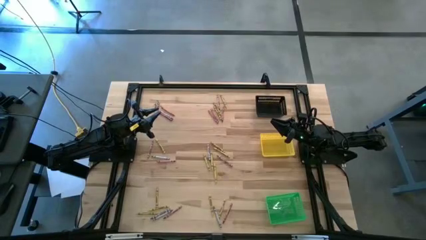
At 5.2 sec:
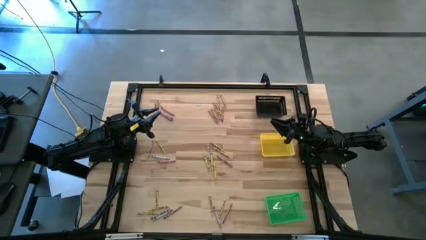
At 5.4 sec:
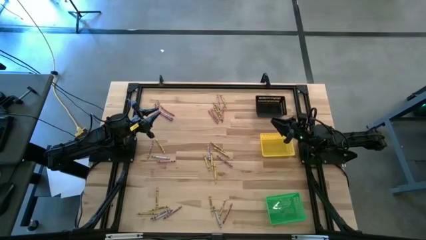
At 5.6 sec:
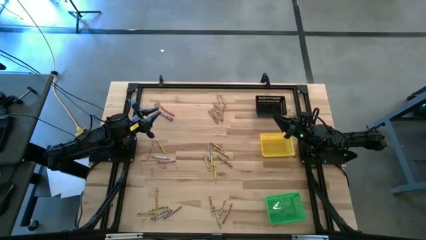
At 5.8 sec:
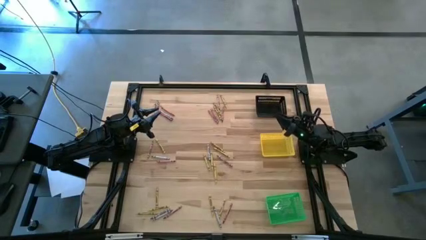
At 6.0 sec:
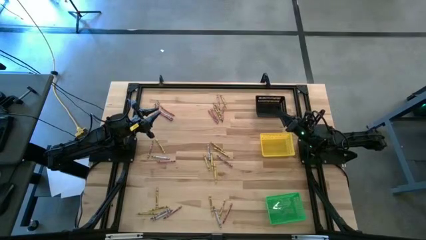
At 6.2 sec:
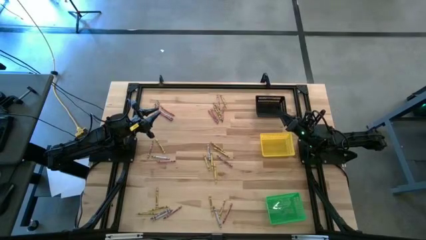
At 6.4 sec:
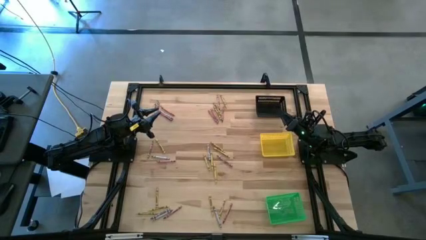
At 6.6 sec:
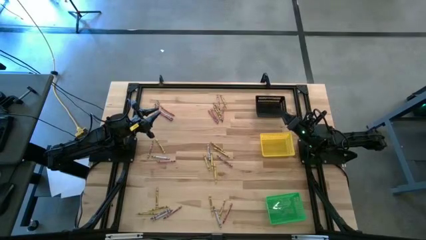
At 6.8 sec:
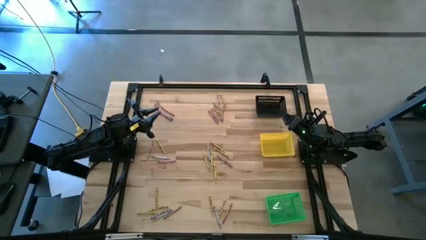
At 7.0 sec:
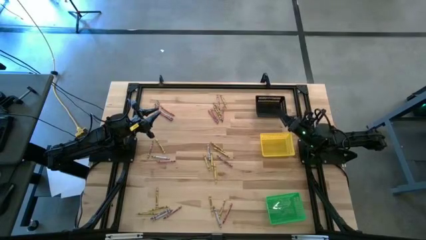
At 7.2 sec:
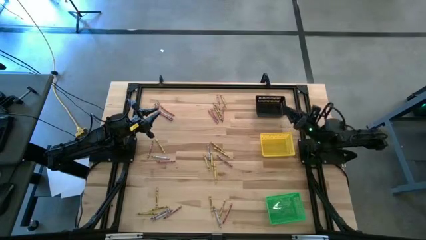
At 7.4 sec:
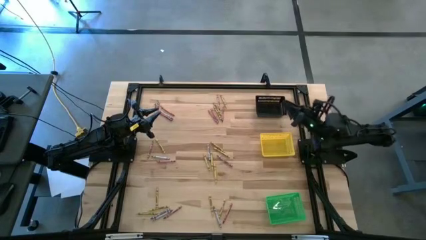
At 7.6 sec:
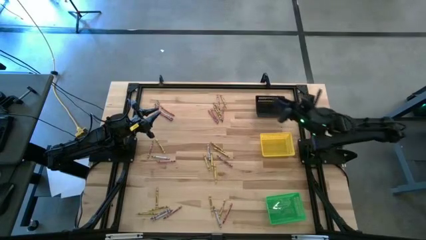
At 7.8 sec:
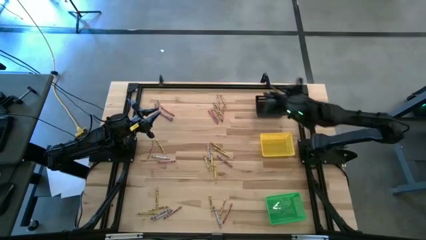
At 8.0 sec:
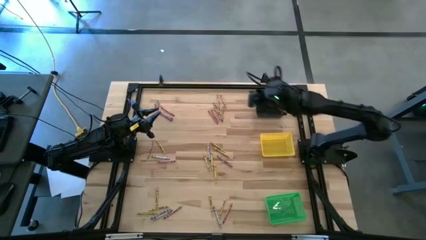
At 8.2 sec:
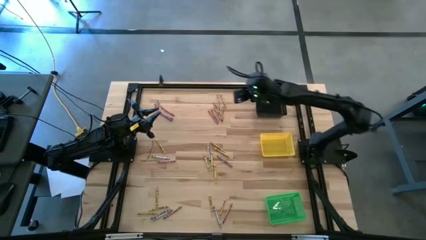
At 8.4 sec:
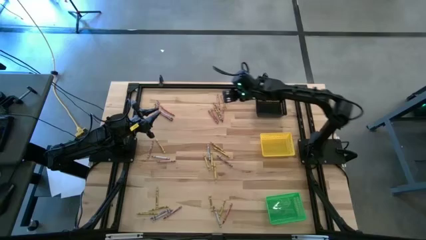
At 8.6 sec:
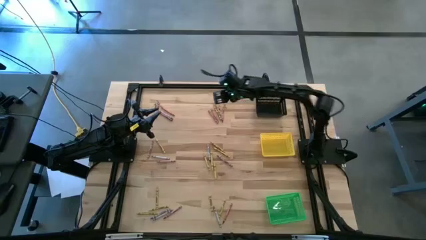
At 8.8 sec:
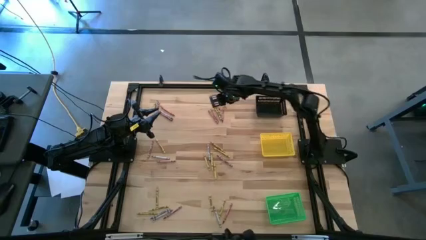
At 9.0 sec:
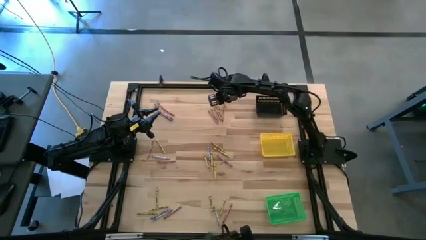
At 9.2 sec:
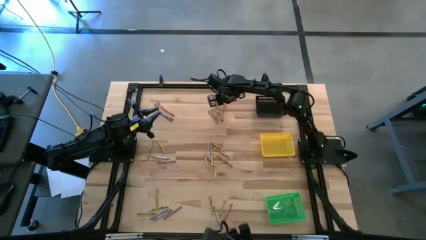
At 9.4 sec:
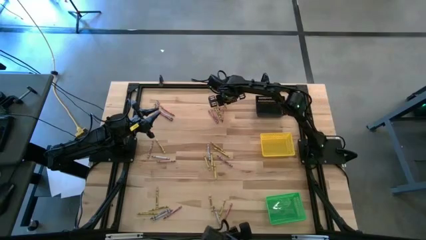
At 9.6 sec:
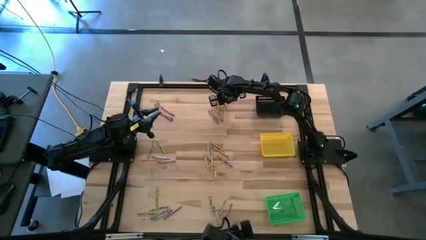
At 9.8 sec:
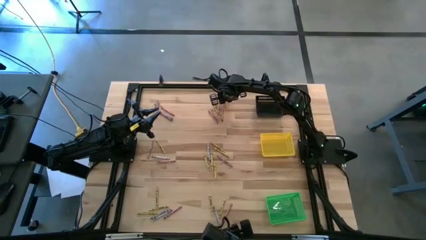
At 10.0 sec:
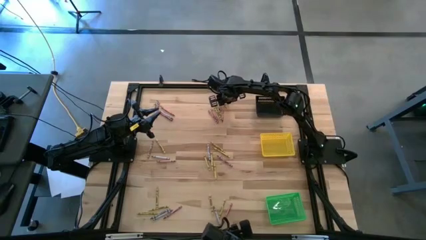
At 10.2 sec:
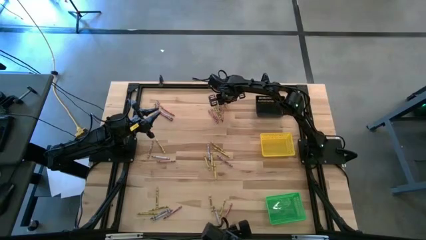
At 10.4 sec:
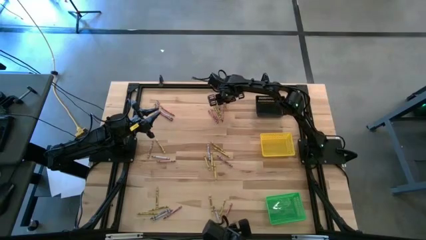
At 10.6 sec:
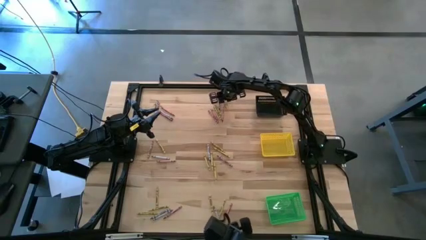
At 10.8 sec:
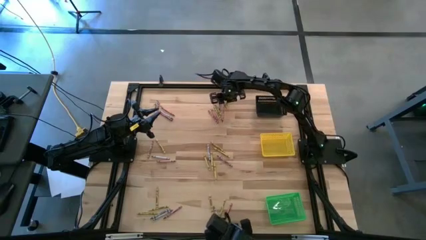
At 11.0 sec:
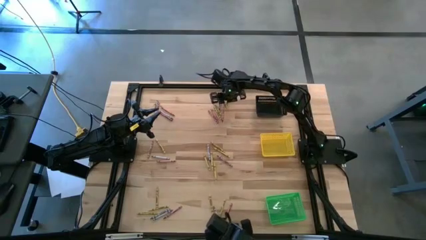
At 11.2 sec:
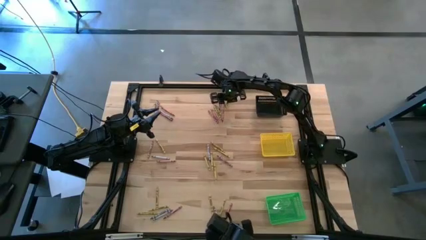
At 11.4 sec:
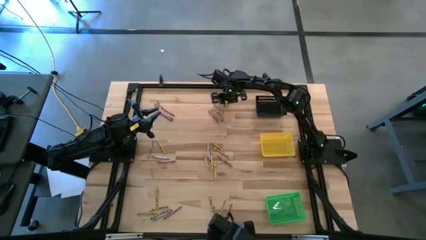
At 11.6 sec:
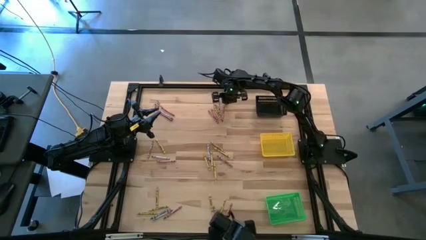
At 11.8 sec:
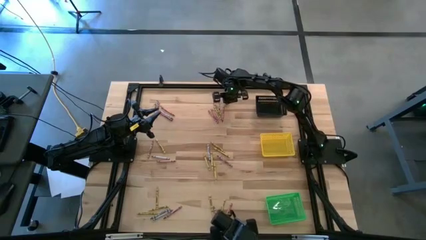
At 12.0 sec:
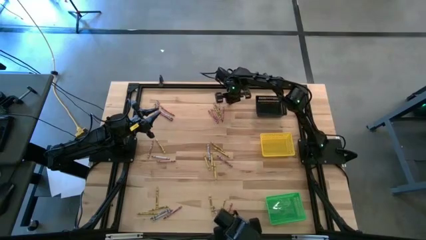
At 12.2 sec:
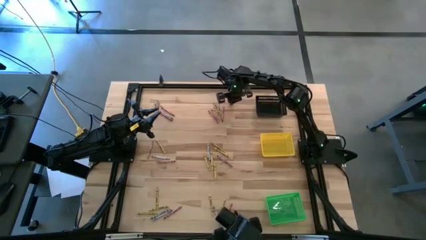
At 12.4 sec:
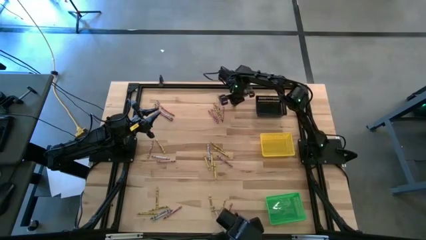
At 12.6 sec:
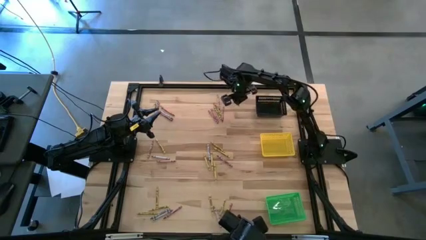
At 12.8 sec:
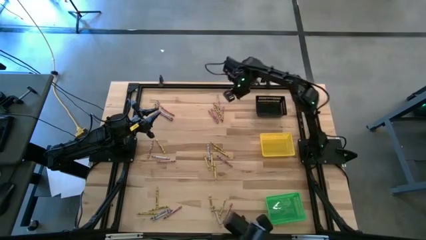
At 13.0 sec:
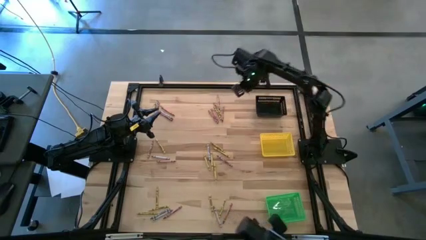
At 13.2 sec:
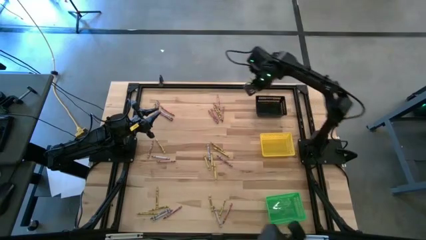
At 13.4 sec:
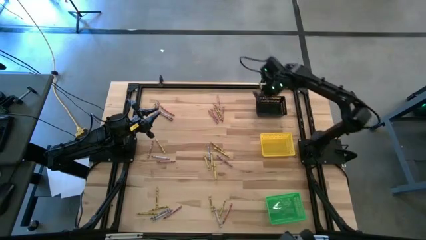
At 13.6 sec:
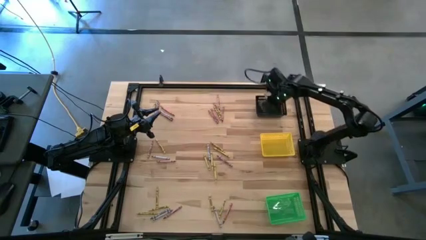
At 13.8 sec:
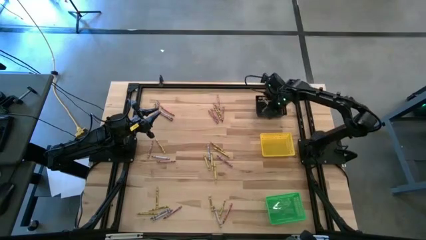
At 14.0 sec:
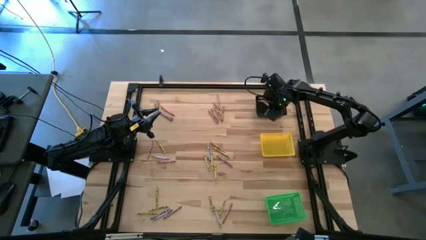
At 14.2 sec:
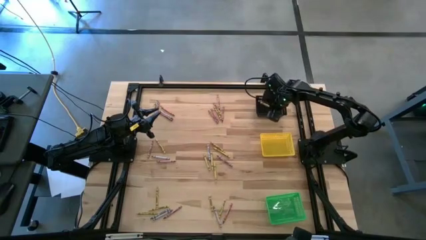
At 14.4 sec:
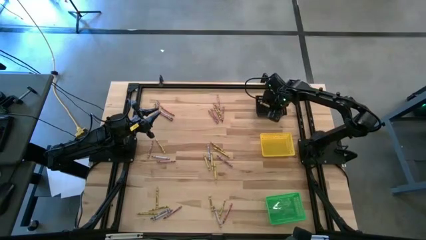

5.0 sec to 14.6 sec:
Task: Sort crayons
Put the yellow crayon into the black bin

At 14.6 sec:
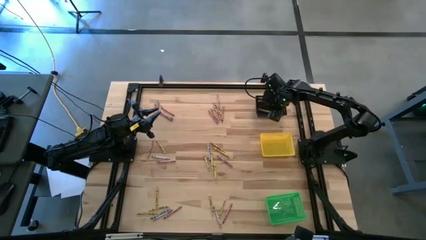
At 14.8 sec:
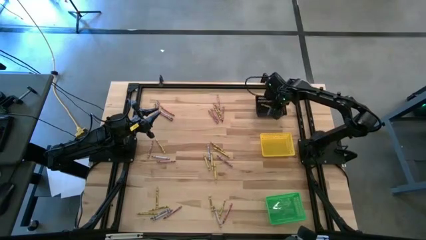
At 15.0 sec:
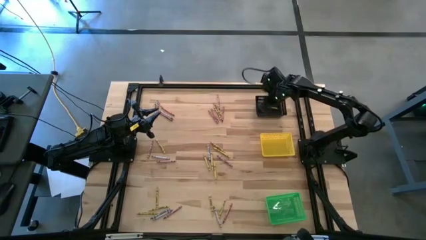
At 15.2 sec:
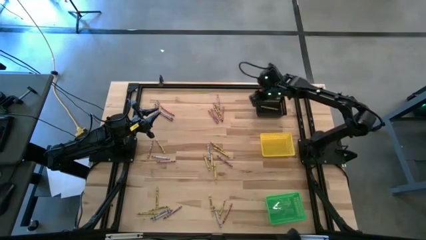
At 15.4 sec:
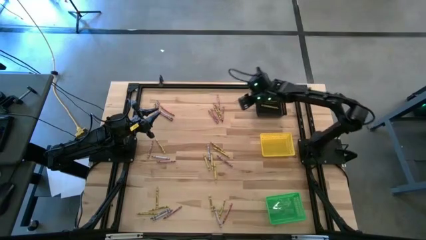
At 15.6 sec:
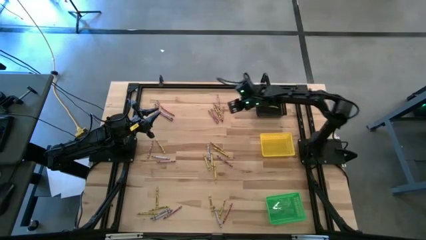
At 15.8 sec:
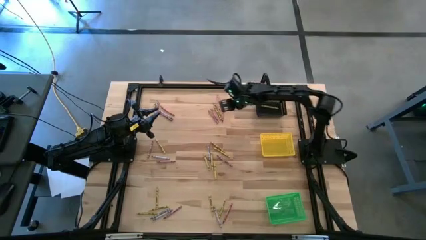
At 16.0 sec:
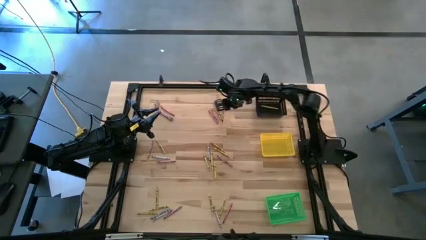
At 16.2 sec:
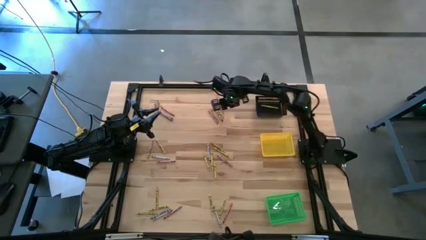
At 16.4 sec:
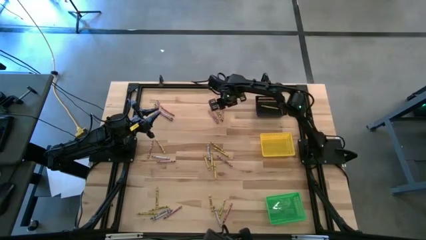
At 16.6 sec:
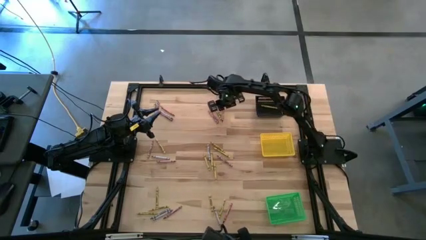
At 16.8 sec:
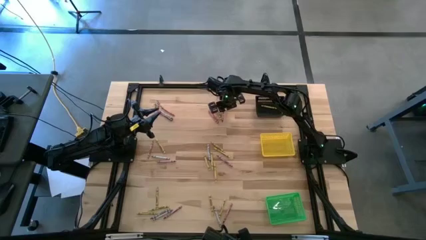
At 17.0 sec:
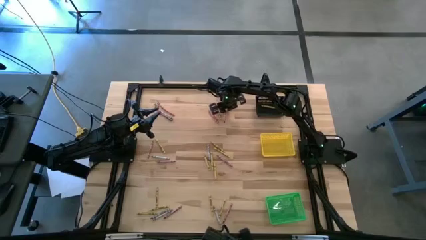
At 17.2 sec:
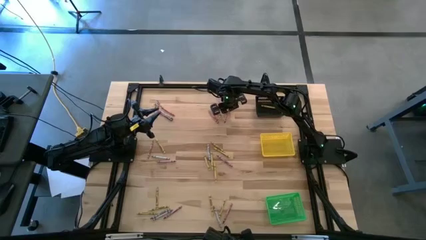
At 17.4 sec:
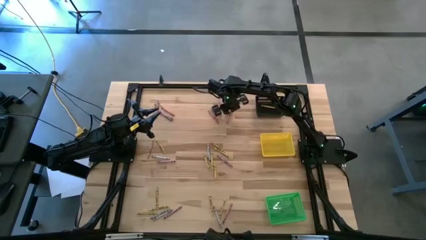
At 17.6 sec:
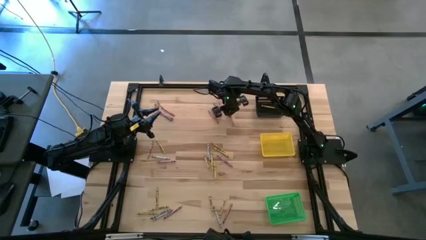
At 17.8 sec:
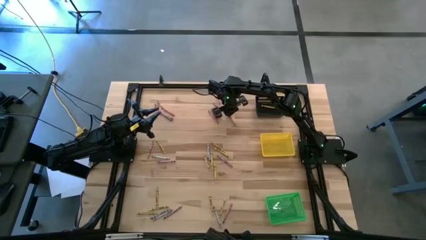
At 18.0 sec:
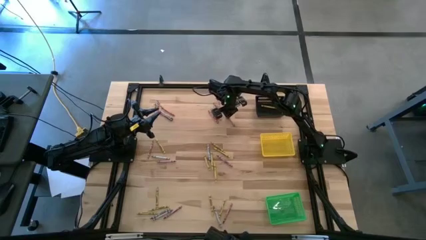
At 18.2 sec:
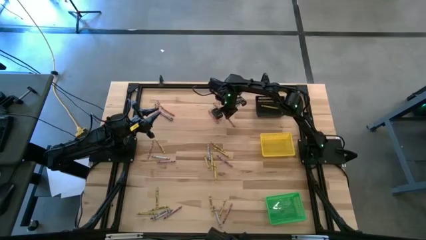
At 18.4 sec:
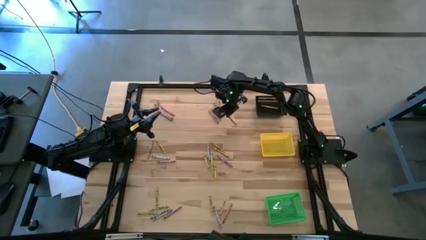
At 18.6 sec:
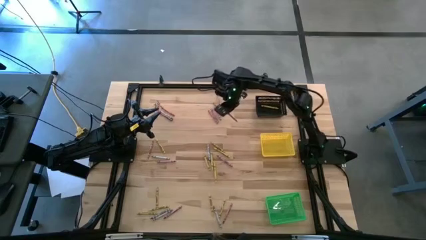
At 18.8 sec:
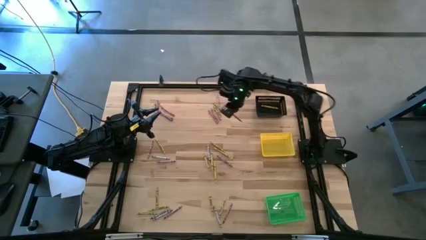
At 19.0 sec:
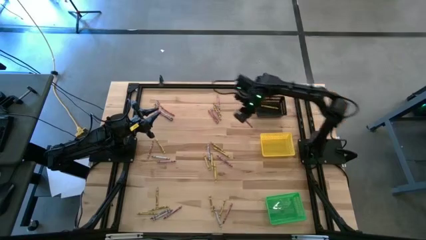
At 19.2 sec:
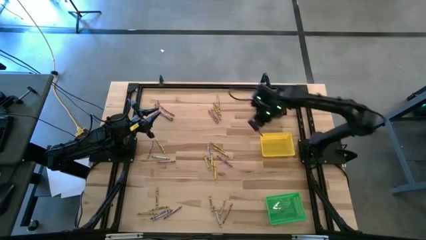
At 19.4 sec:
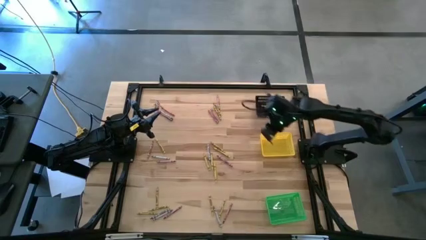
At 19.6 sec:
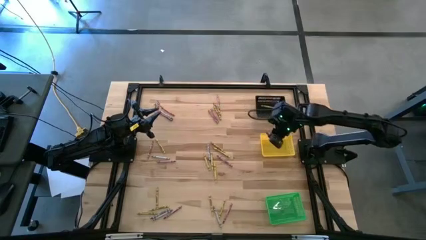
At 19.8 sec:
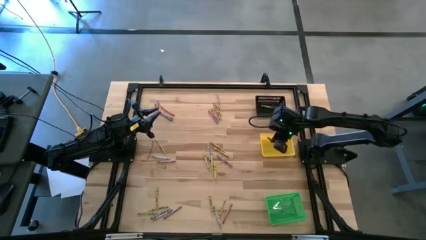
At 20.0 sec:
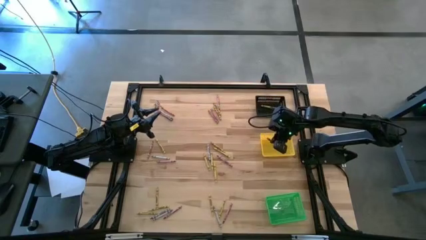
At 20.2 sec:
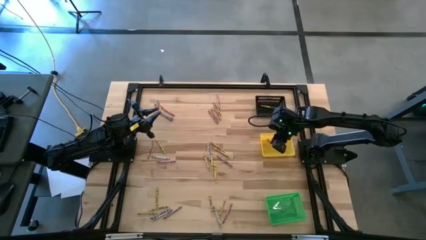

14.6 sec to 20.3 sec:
Put the red crayon into the yellow bin
